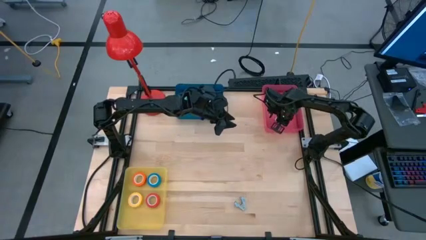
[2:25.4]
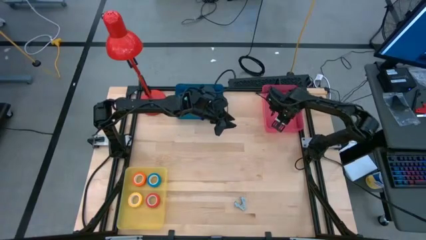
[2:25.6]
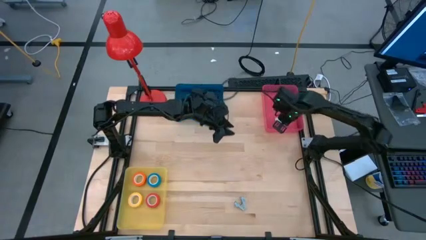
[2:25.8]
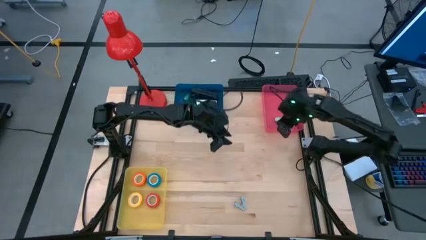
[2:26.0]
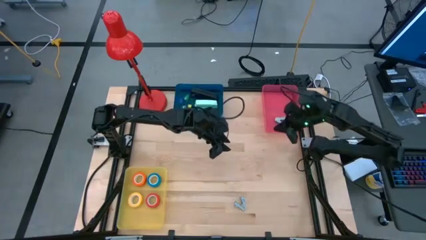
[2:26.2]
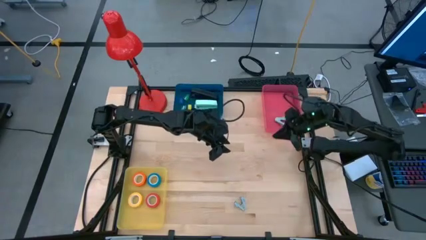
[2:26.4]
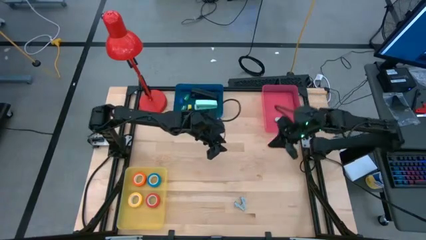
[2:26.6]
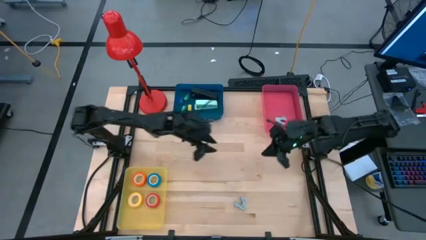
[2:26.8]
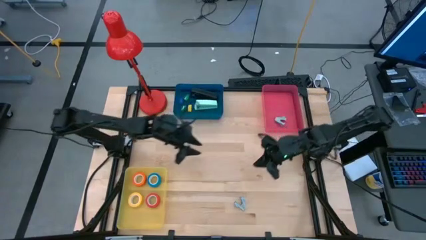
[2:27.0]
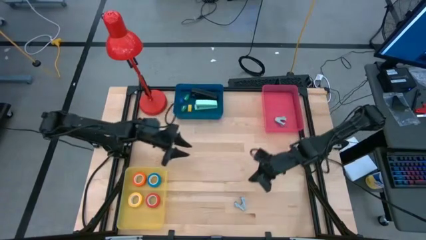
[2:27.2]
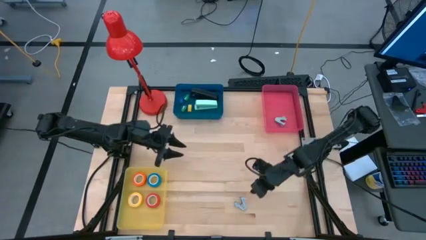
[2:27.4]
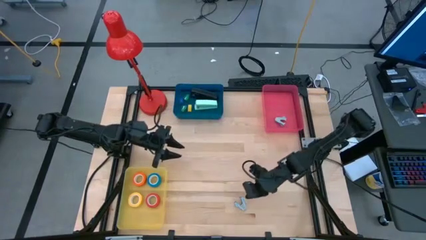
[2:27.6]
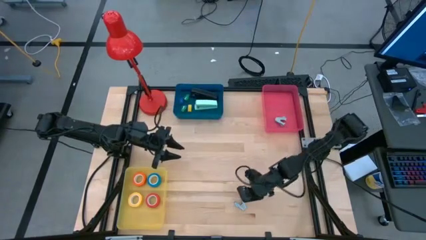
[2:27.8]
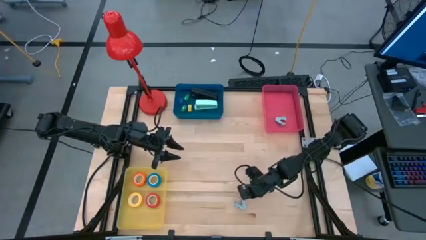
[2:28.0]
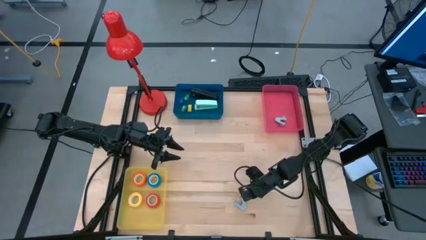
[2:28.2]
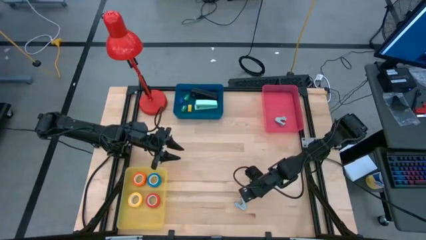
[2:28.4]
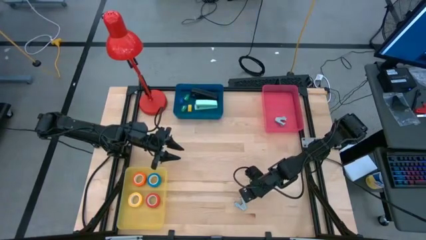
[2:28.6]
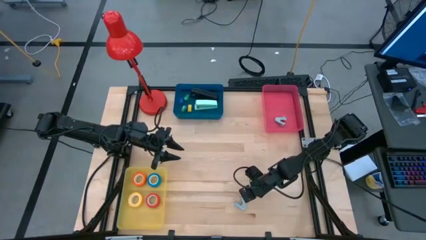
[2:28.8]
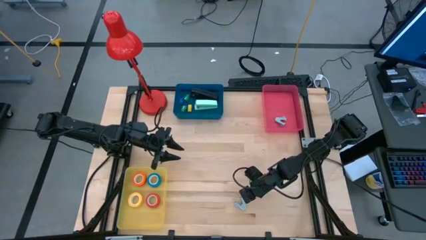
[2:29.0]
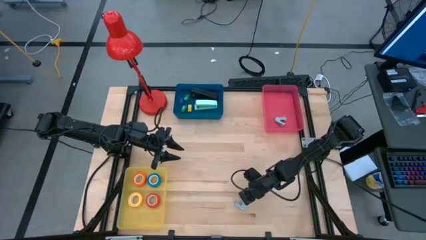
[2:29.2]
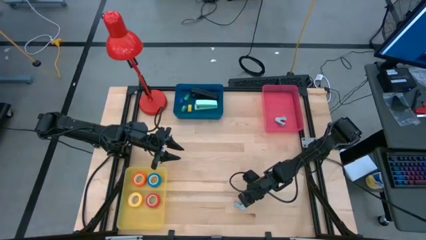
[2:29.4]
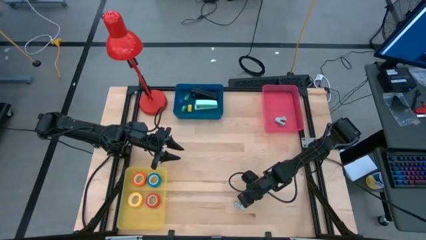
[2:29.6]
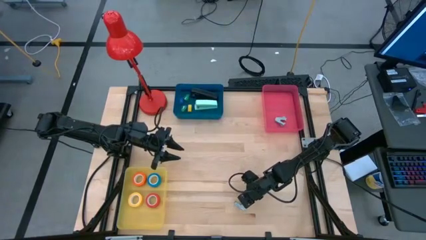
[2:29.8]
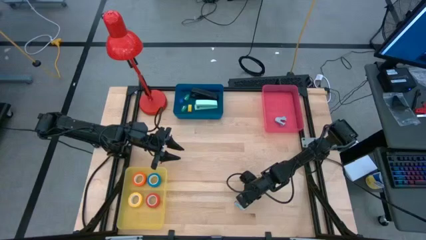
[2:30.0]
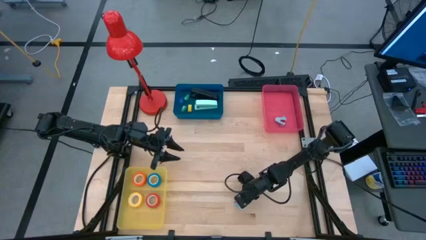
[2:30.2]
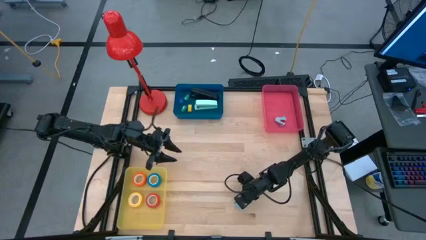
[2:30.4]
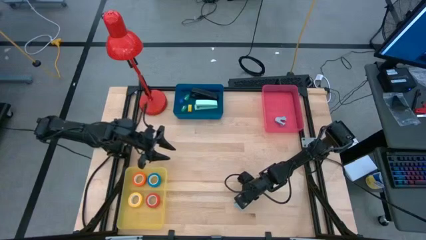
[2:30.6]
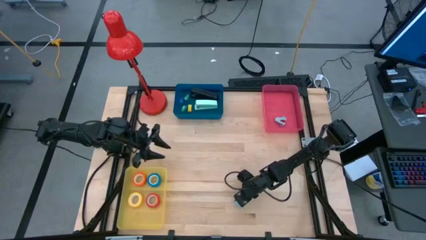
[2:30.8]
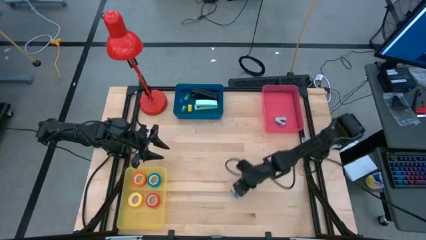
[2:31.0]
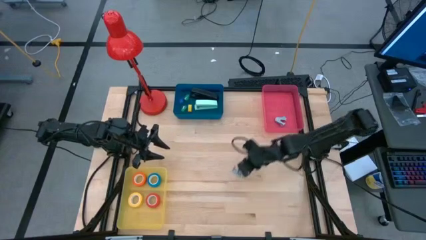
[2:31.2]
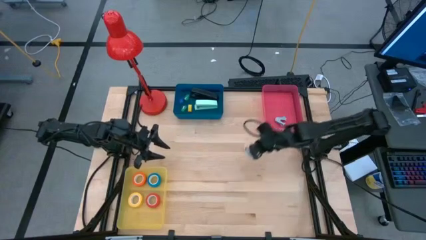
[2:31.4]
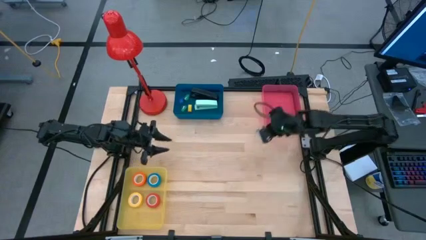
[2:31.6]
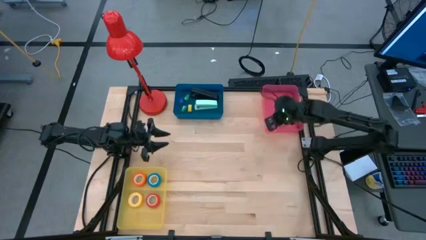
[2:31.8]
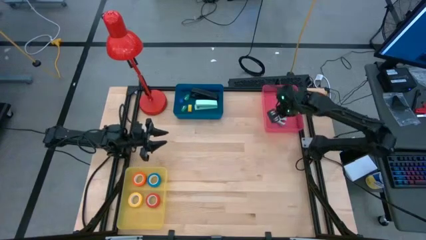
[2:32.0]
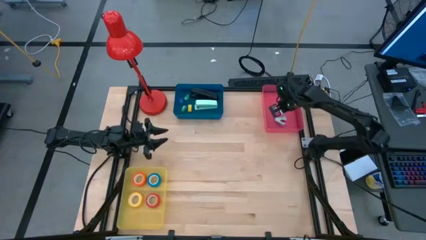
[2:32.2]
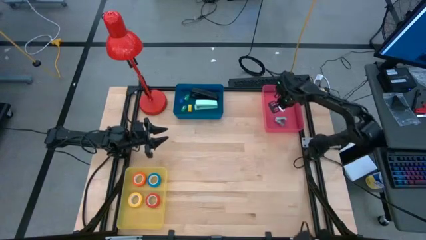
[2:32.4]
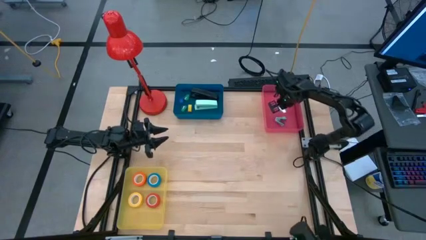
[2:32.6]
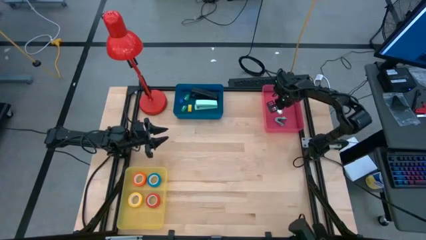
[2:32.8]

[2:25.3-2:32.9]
Task: Pick and place Stapler, Stapler remover, tape
Put the gray staple remover into the pink bin

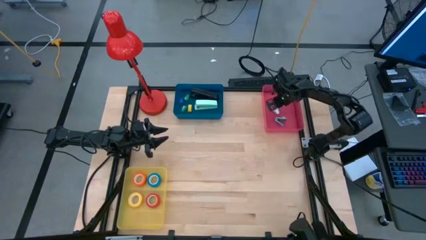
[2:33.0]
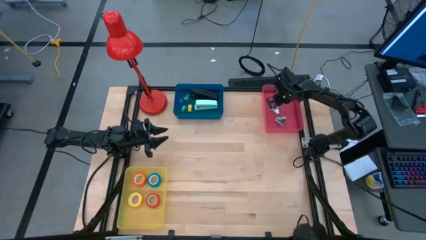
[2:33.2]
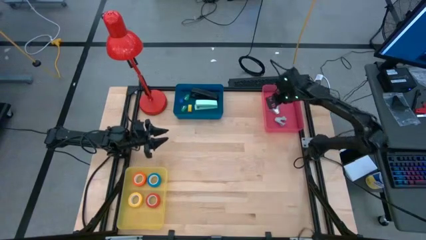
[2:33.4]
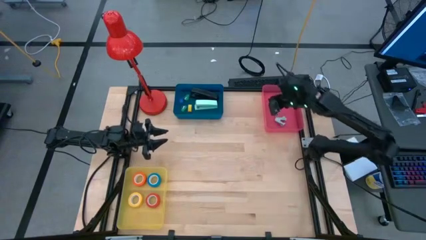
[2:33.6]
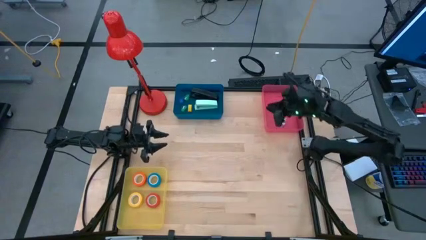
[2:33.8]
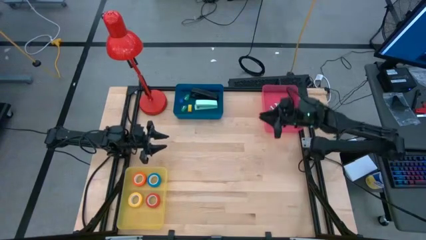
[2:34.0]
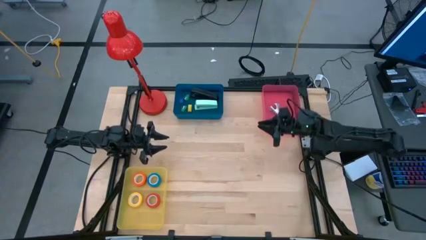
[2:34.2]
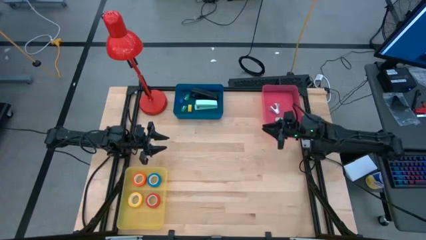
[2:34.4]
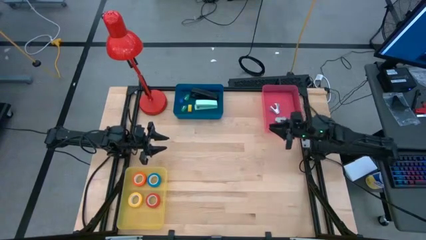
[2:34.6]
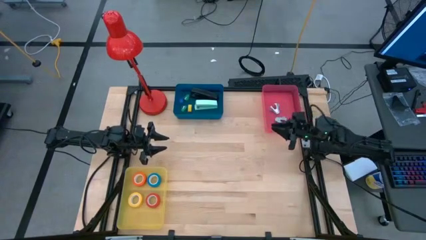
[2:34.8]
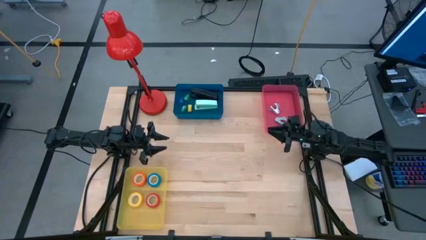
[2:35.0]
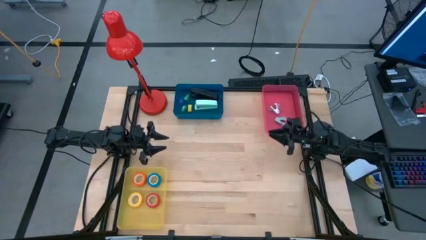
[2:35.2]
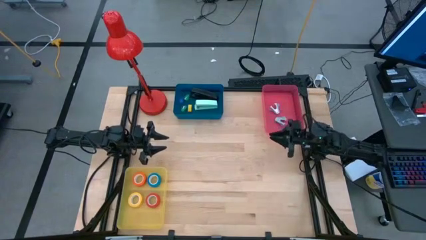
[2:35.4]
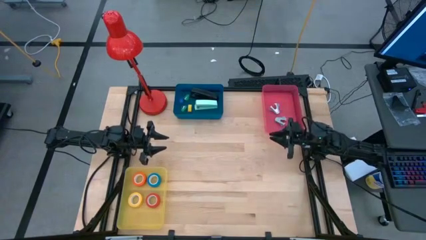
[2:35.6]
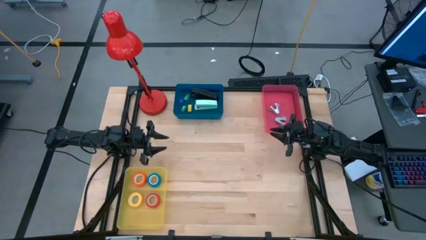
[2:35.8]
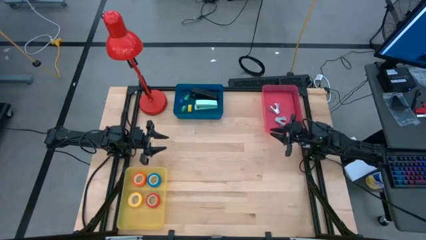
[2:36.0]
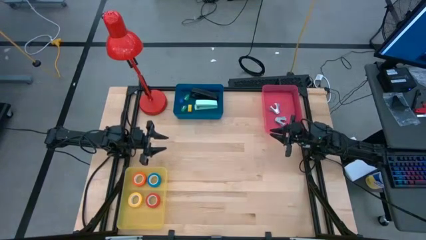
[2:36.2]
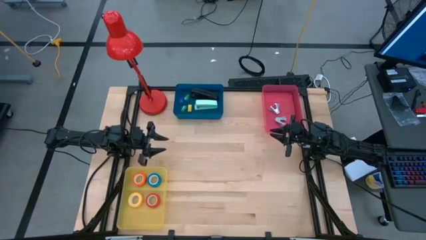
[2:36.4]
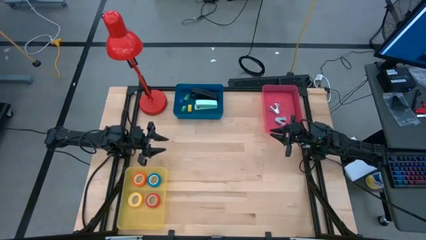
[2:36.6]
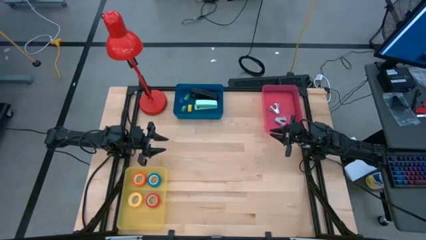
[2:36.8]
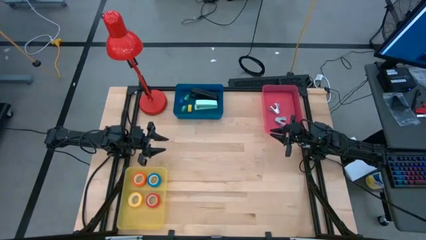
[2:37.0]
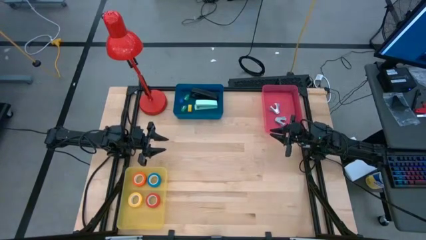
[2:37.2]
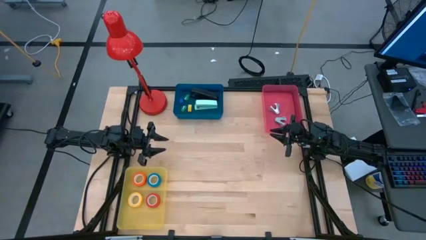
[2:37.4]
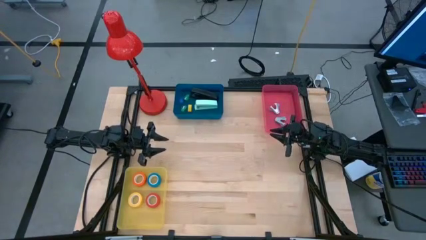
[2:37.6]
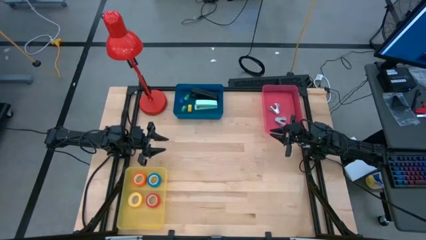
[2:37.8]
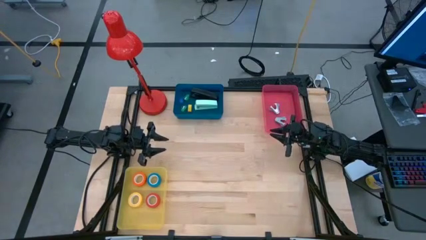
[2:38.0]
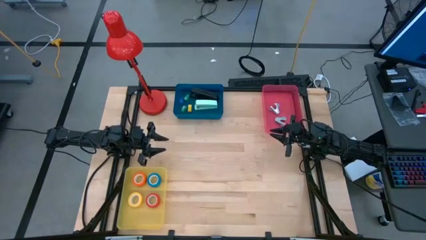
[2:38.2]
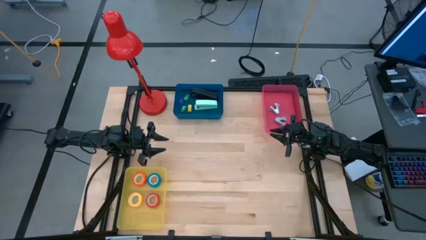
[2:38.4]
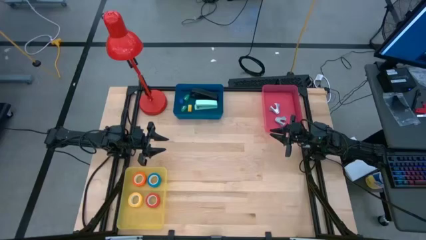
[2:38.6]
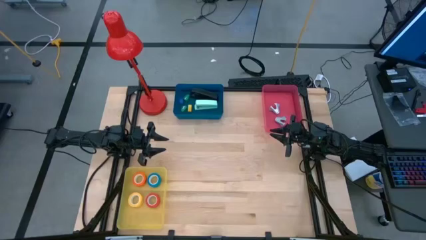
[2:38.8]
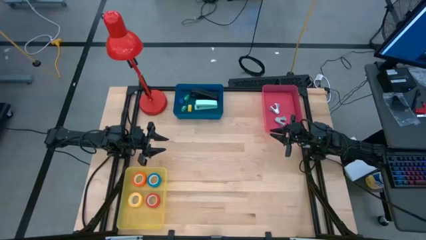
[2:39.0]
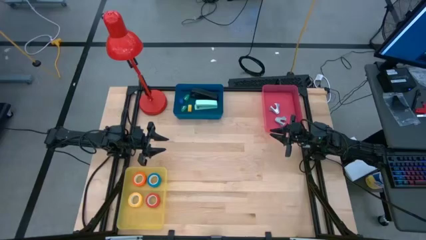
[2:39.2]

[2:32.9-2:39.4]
Return to Home Position

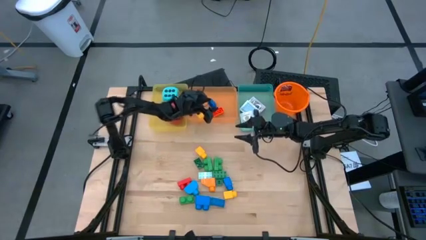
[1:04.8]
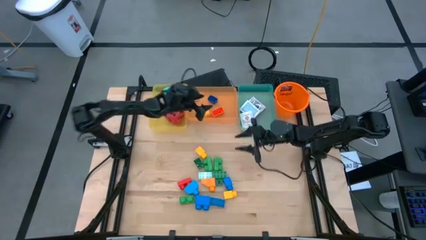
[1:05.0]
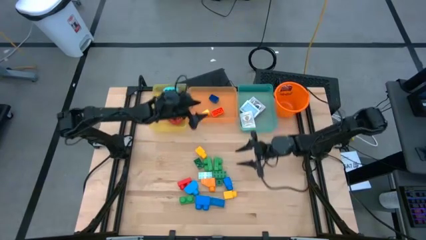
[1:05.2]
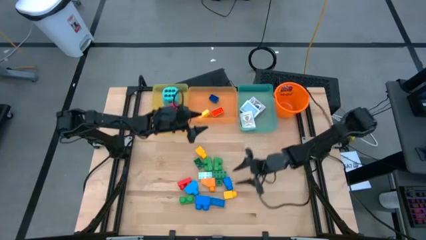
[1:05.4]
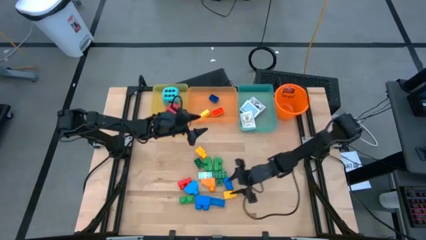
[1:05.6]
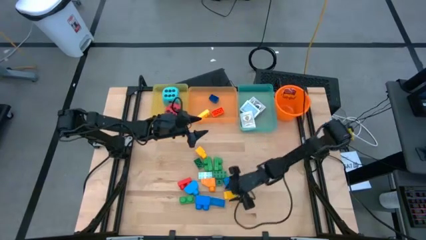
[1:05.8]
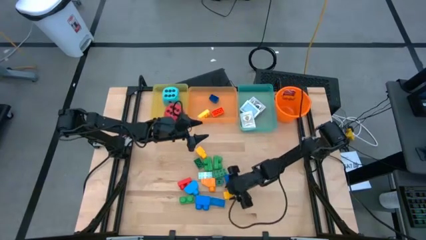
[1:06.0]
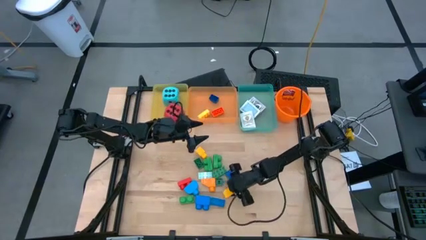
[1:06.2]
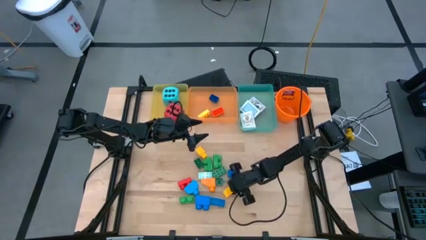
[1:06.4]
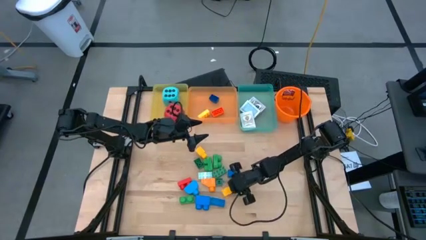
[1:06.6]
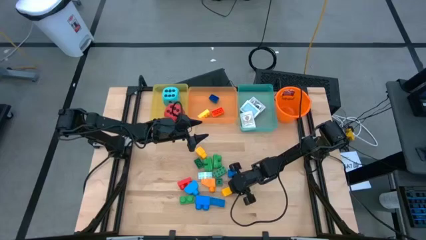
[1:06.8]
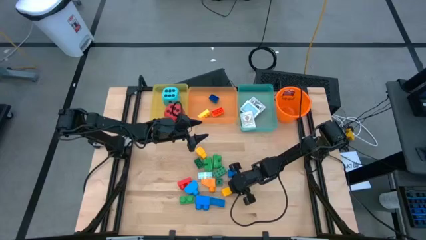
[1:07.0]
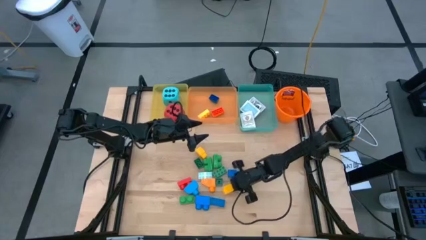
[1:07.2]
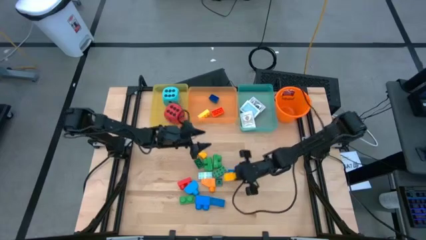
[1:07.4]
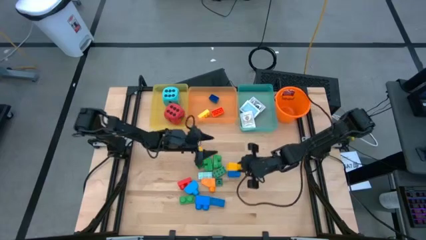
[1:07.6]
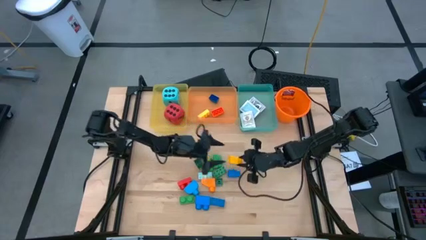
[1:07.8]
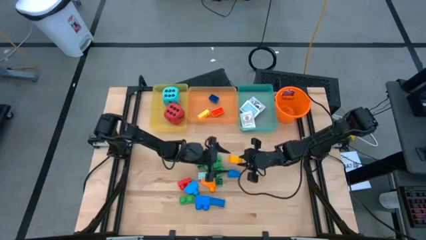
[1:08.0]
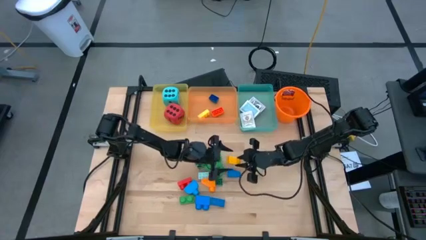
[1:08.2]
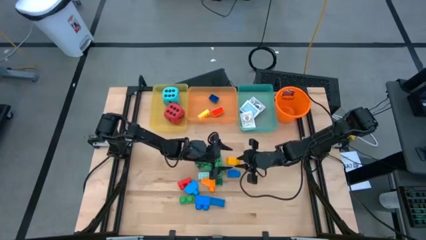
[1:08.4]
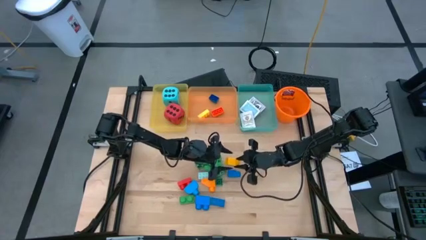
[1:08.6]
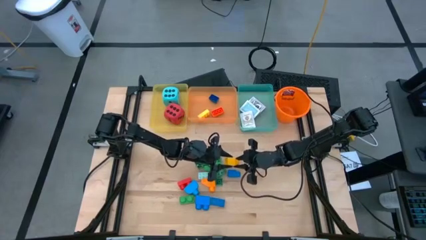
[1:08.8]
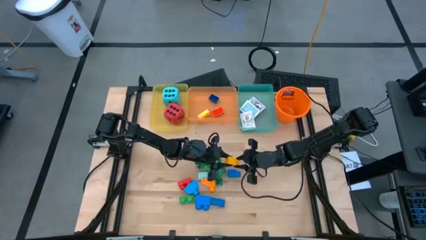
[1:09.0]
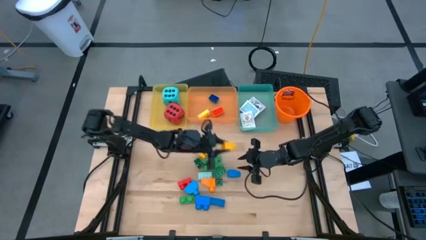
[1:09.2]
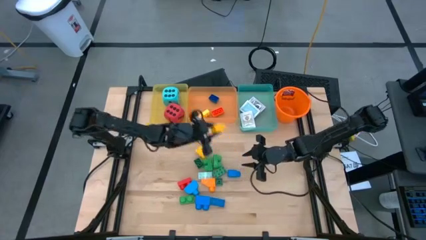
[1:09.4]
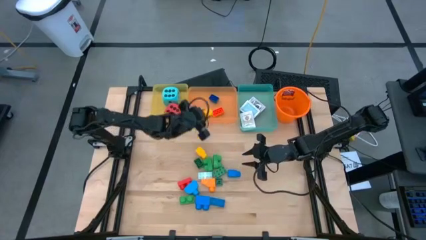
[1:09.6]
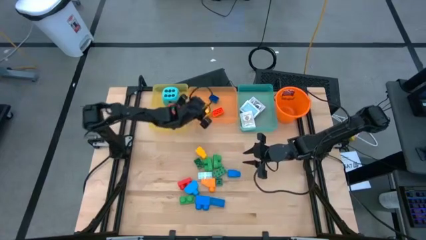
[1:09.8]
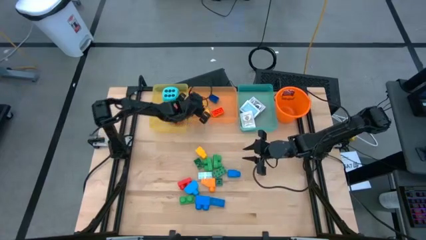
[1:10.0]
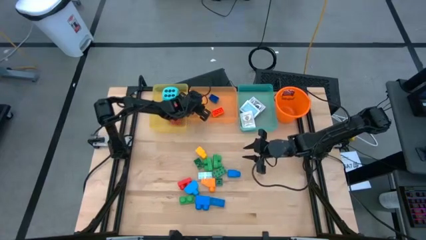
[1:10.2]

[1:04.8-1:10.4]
Task: Pick & Place Toys
Put the yellow game piece into the orange bin
